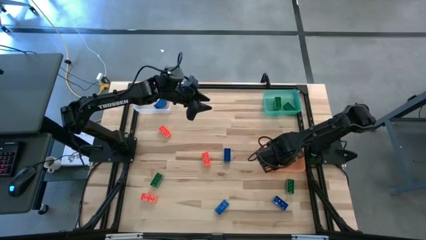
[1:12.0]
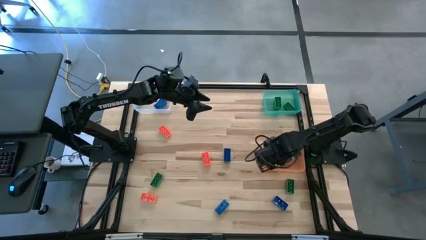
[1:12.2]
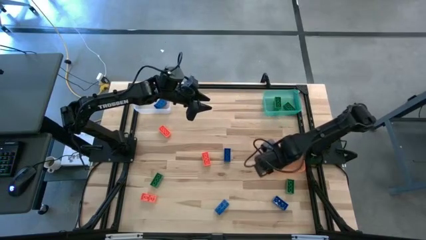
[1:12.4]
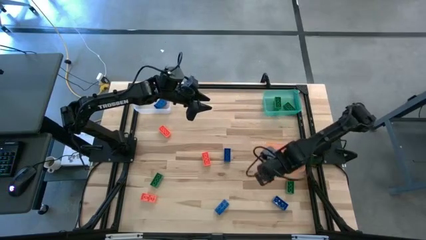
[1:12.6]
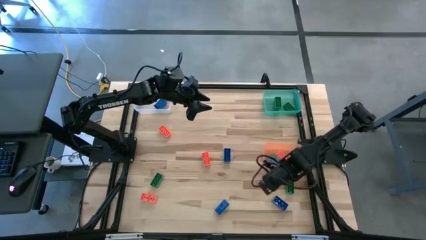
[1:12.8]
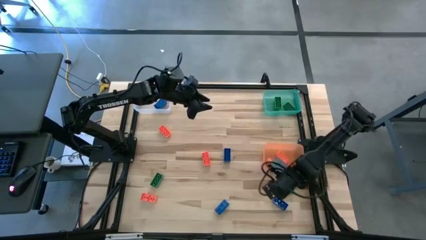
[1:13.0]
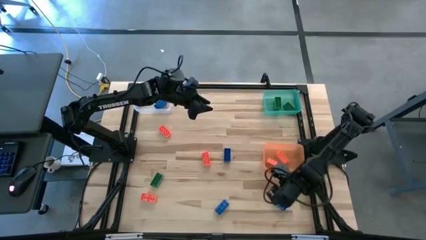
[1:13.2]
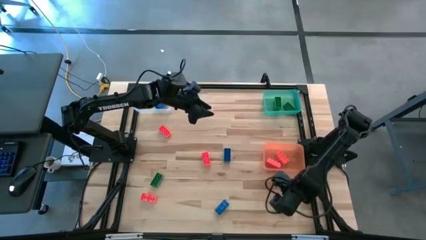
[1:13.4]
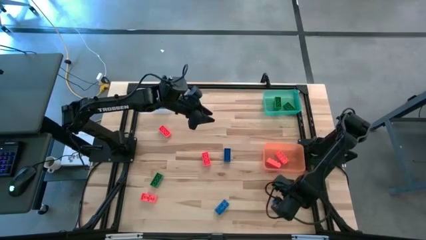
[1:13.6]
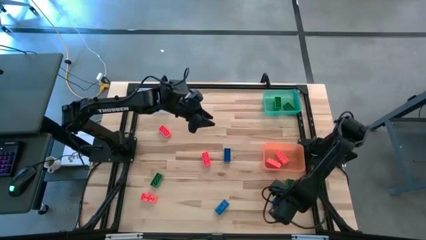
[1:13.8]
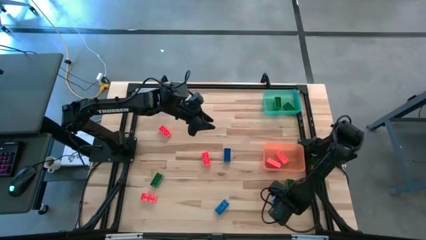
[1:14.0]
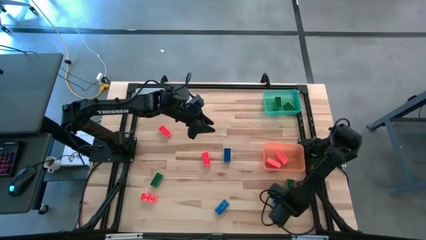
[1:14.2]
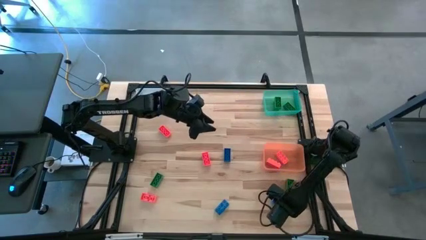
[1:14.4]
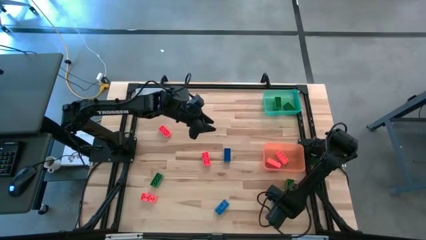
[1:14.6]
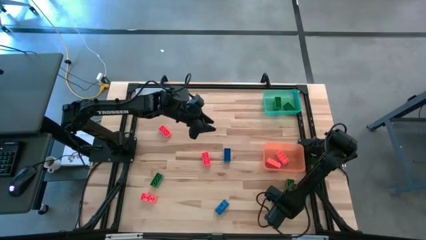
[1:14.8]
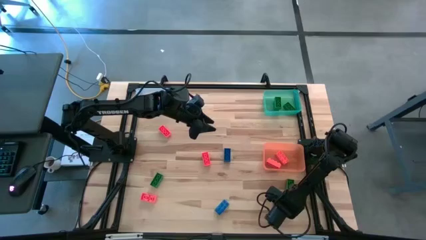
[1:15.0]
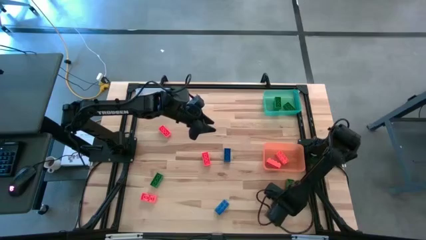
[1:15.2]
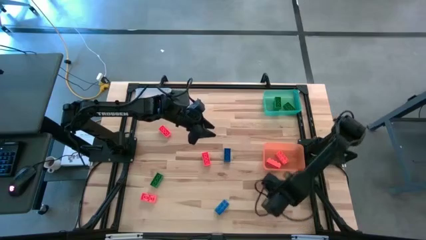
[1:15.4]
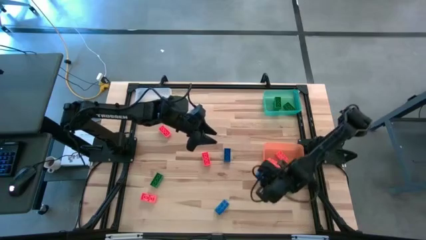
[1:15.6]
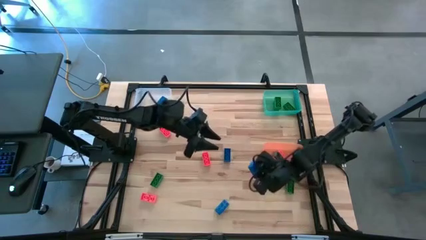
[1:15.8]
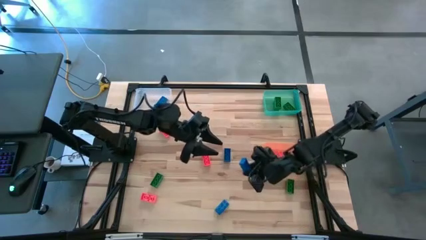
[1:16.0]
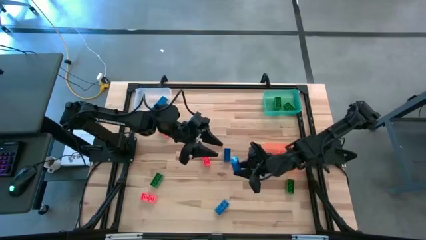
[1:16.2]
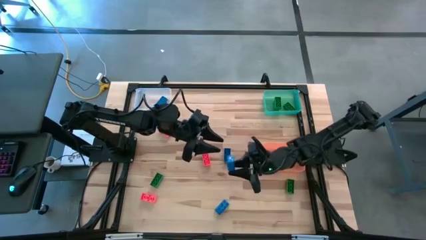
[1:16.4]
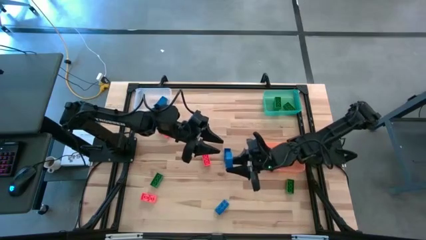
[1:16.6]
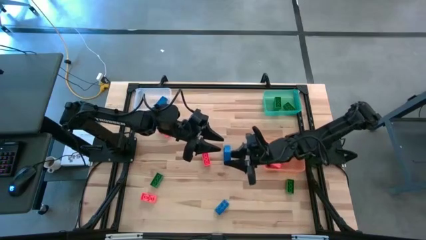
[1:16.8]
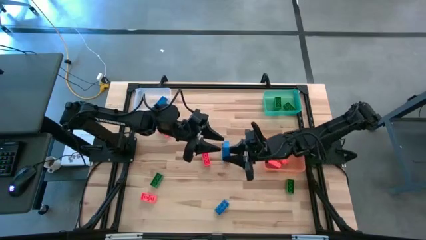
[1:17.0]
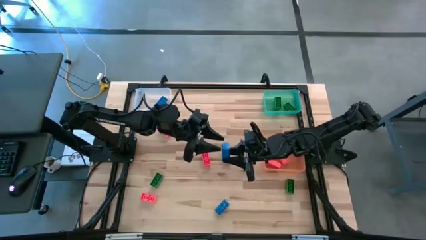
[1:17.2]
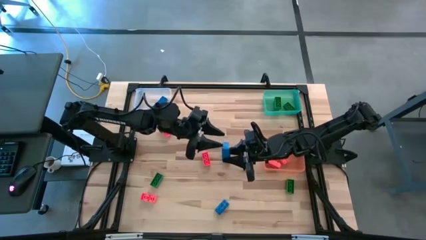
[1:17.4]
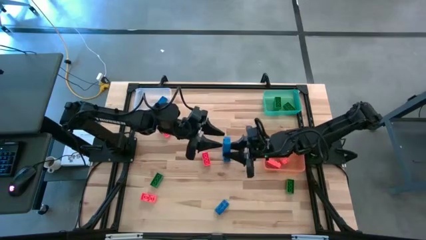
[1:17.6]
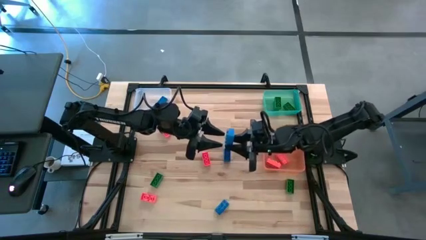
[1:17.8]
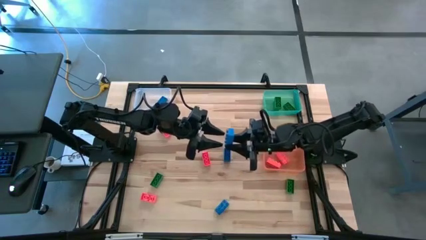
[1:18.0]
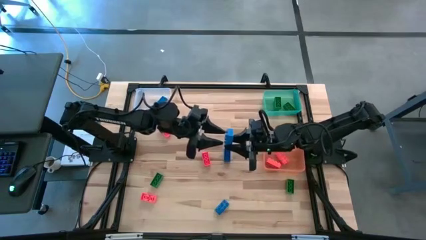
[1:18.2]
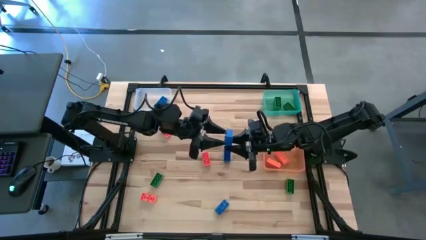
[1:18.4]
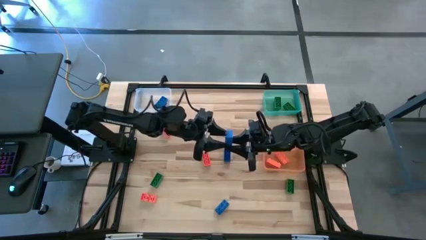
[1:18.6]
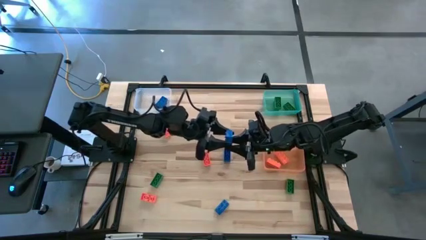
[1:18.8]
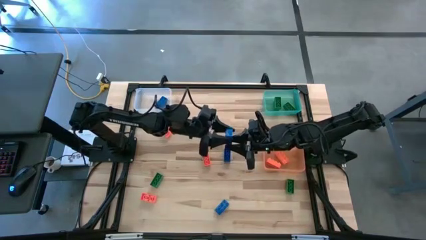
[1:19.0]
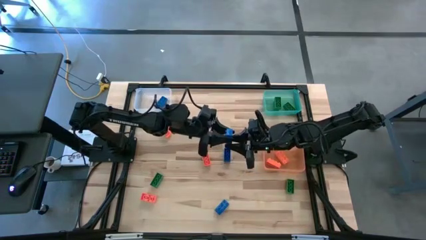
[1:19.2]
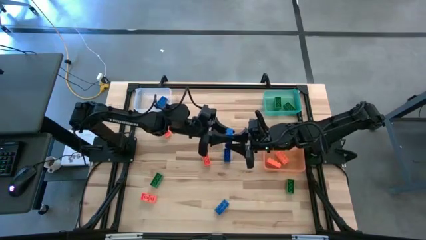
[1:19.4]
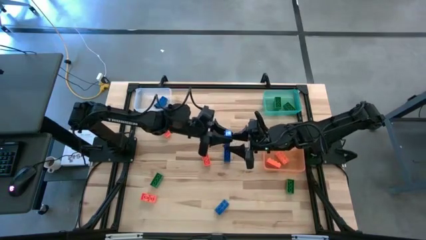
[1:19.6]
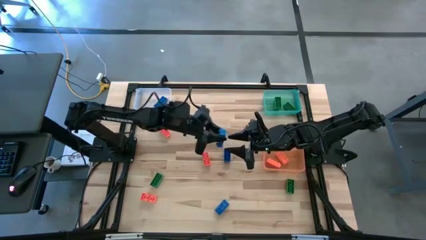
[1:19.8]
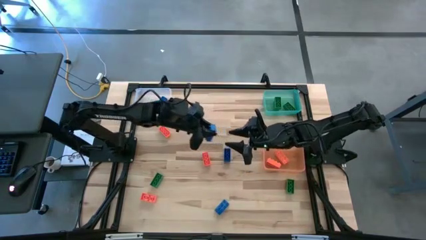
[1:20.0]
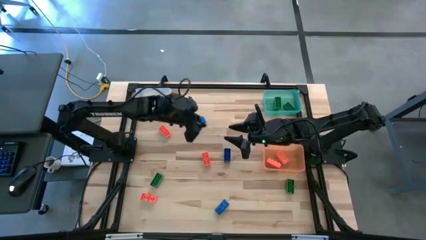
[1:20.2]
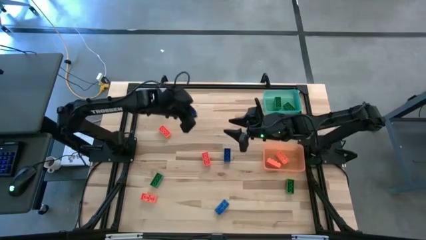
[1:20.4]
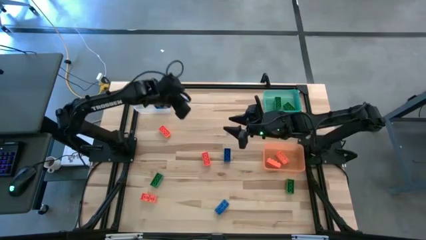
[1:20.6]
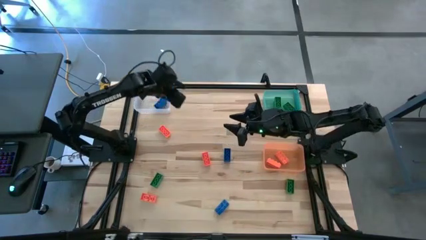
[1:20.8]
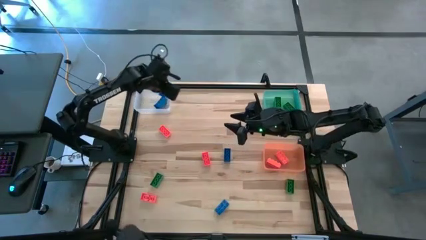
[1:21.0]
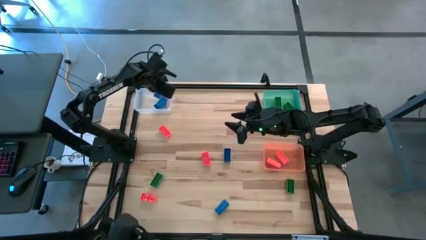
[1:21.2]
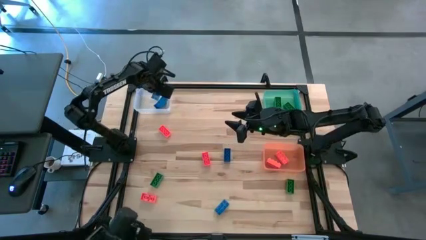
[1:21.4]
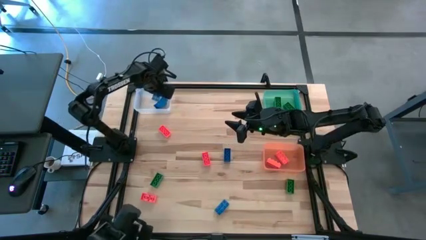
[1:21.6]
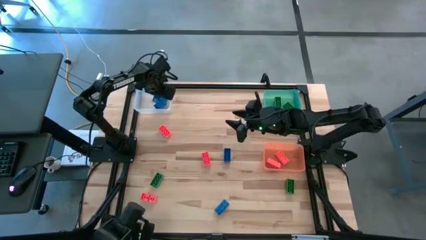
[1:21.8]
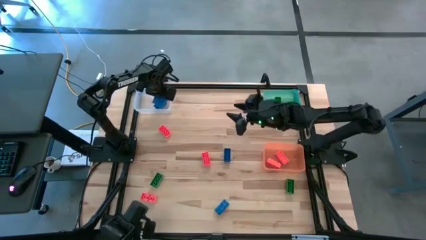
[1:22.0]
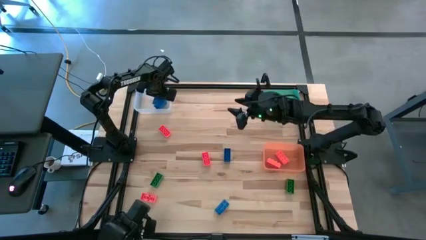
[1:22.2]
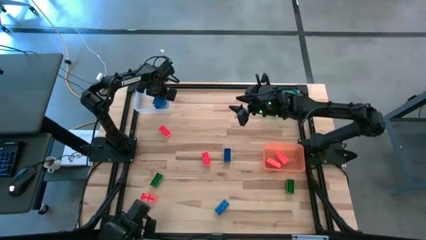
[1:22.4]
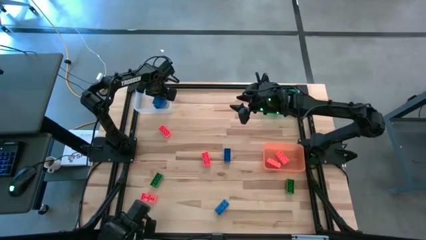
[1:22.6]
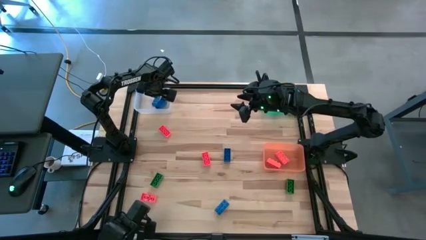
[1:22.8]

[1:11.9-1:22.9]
Task: Sort & place blocks by color
Put the blue game piece into the transparent bin

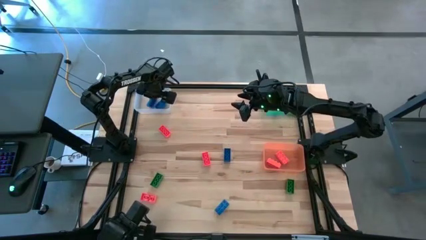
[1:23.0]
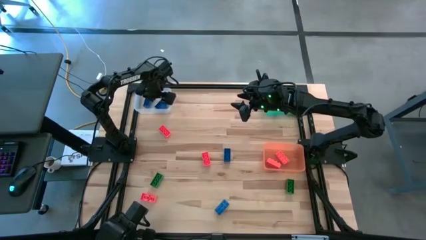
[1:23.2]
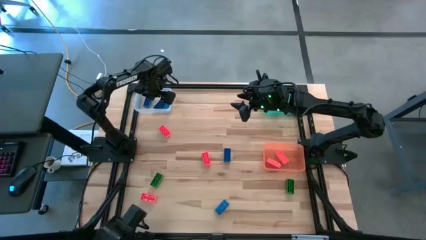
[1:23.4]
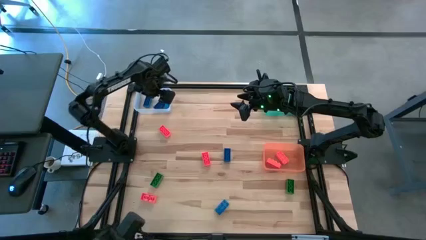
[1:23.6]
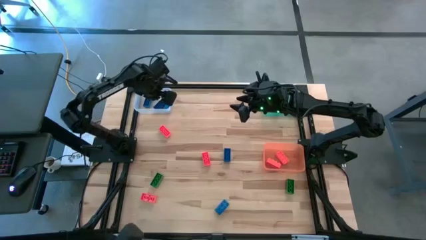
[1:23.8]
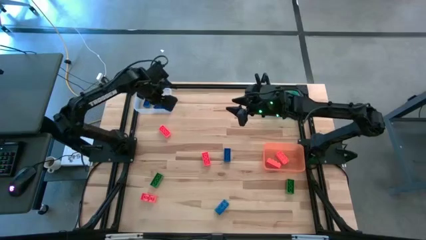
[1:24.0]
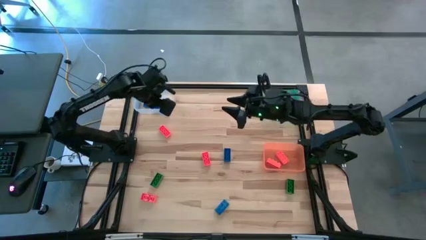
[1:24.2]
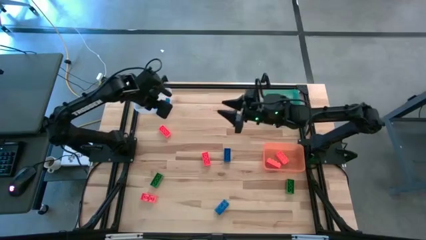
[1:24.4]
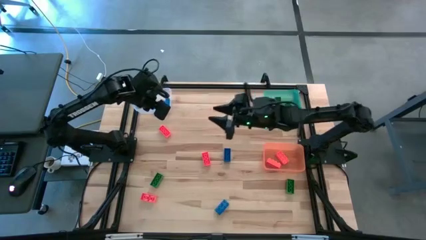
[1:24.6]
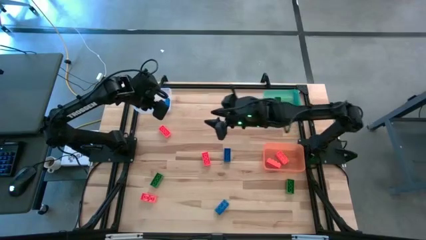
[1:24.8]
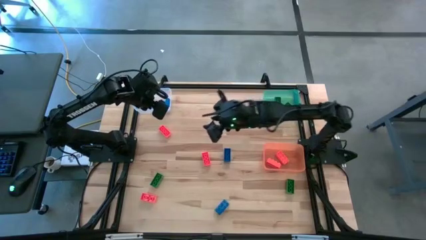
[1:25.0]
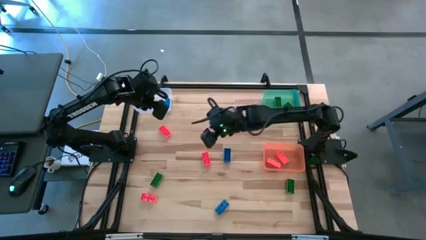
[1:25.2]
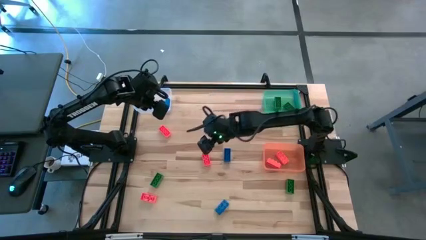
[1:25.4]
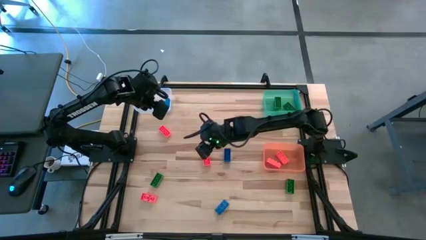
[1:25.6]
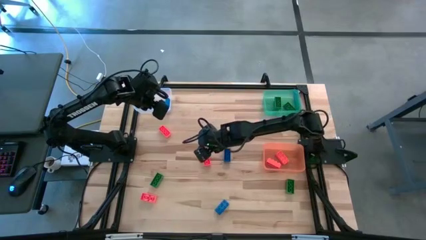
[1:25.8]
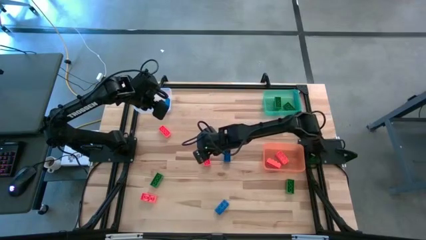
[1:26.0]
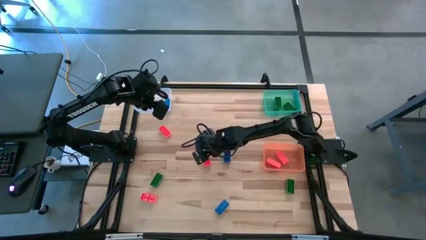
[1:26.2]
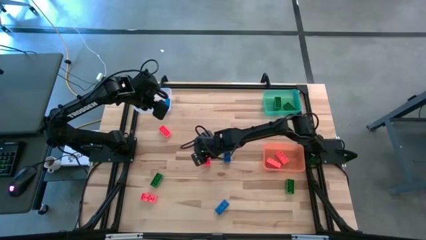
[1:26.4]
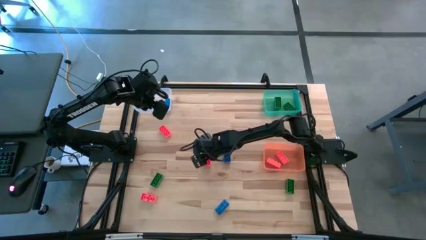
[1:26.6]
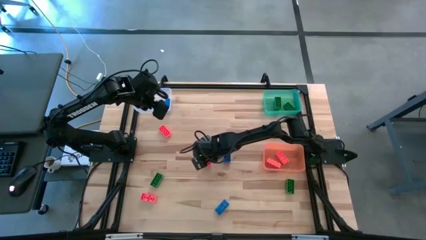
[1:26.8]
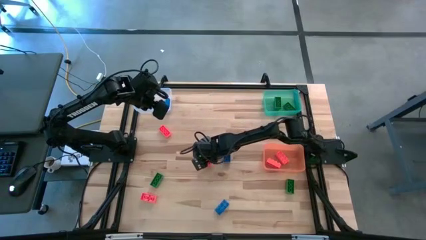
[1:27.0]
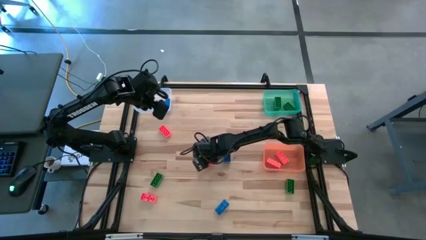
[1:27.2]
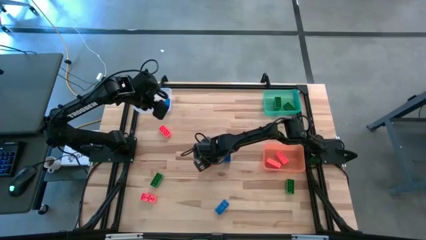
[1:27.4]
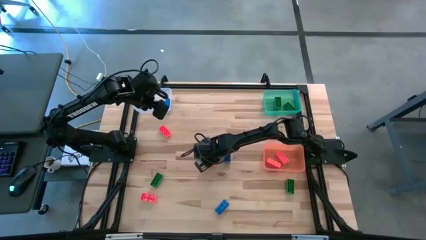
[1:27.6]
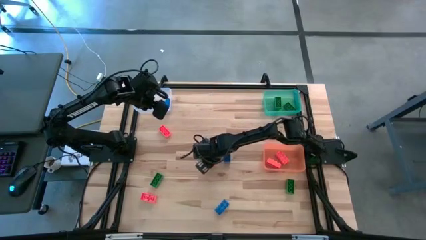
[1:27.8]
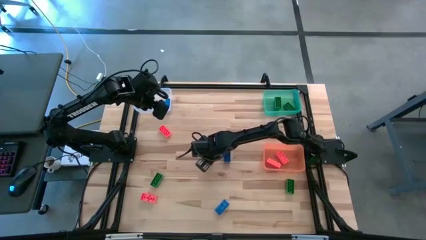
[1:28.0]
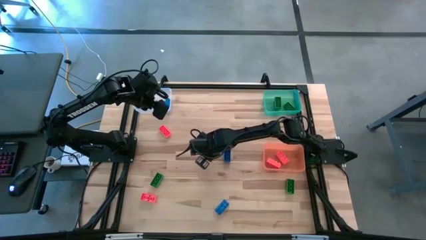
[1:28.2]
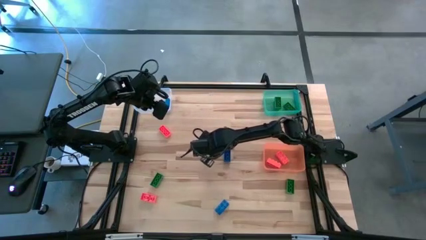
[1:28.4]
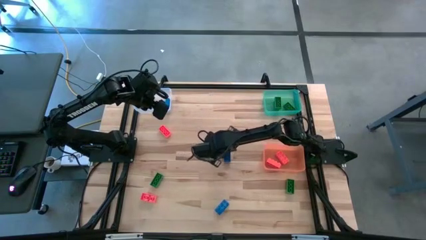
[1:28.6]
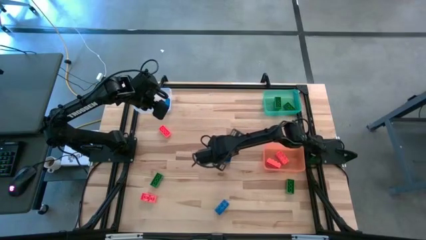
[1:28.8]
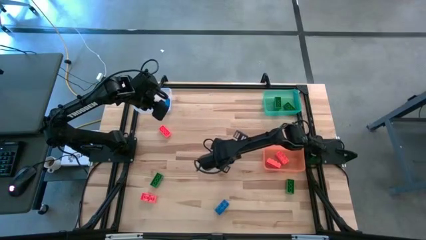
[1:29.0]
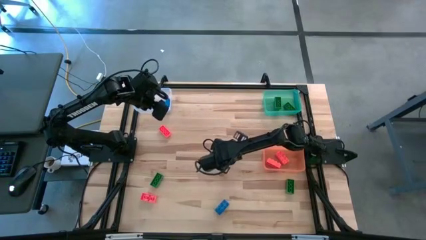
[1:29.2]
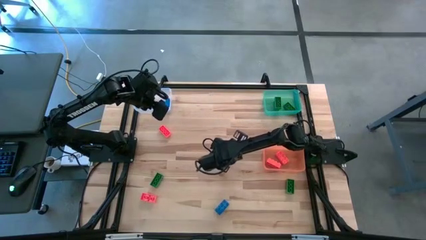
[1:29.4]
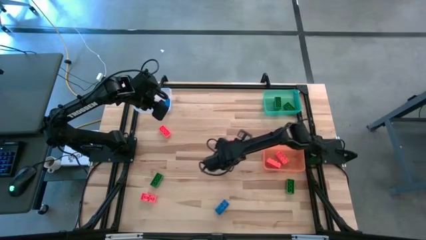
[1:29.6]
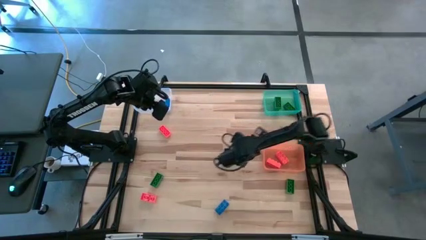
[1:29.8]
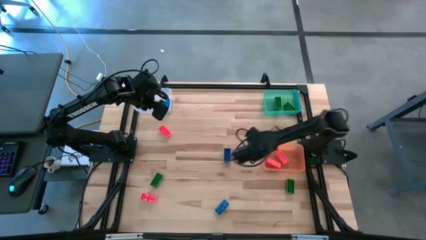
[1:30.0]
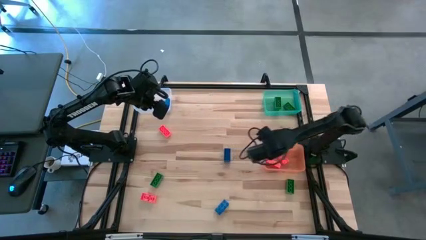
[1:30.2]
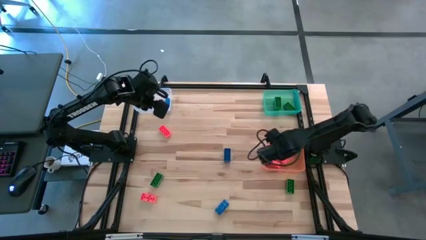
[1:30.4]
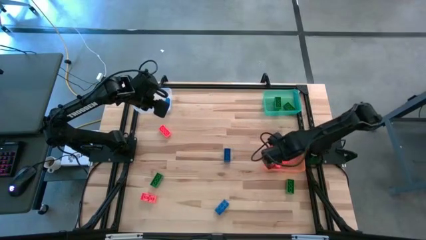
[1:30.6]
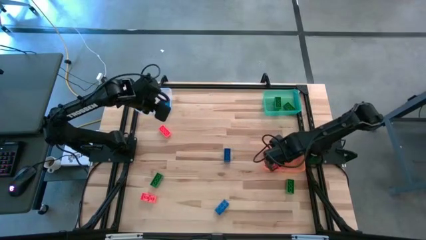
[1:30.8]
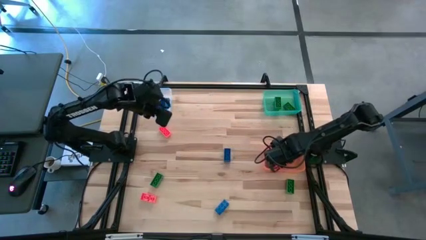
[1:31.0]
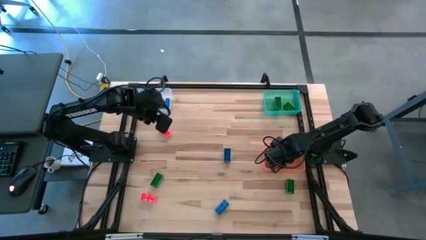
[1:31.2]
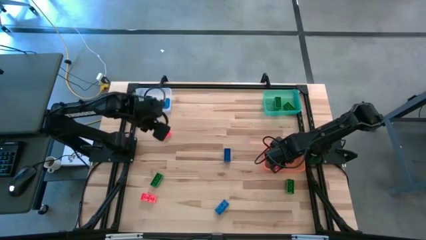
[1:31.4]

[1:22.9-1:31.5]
Put the orange game piece into the orange bin
